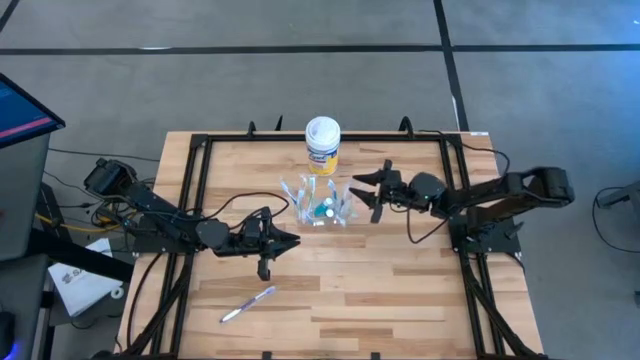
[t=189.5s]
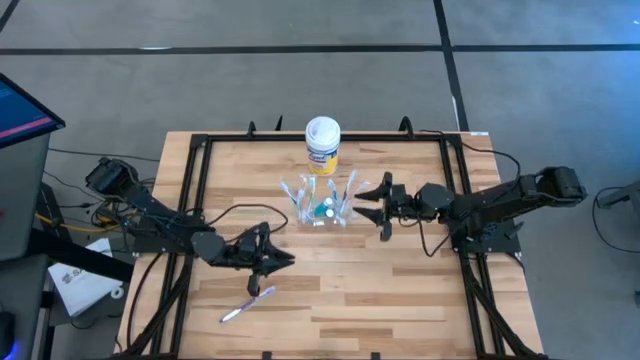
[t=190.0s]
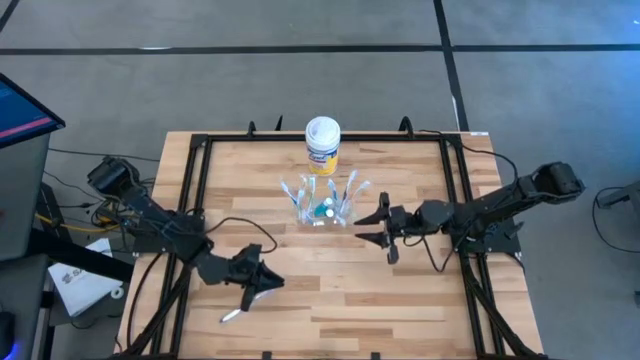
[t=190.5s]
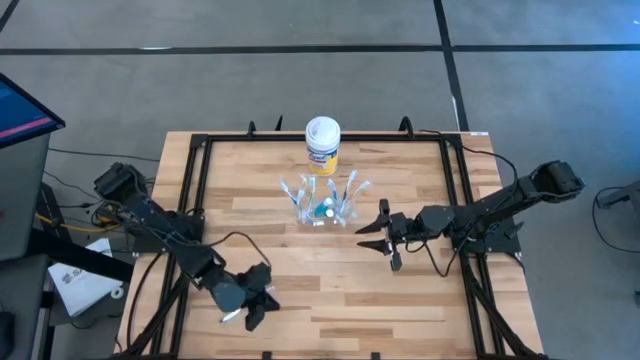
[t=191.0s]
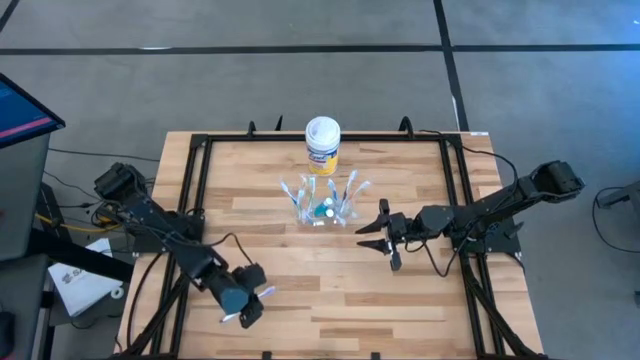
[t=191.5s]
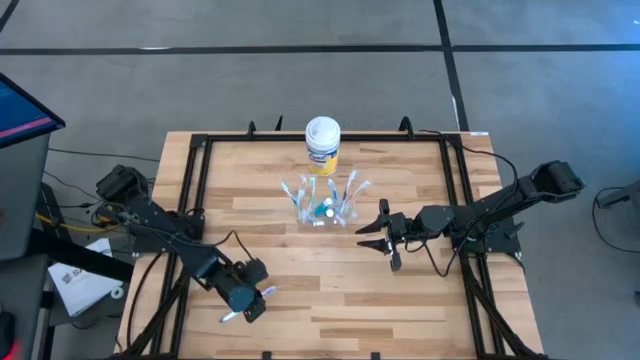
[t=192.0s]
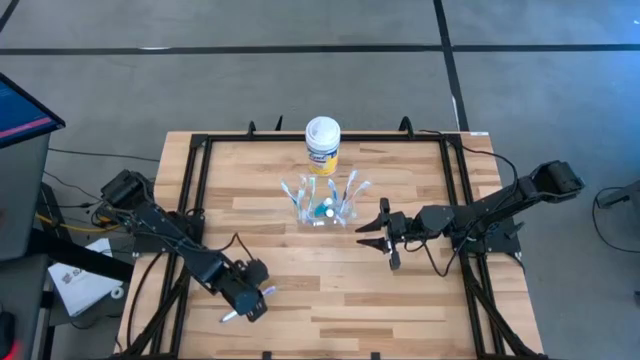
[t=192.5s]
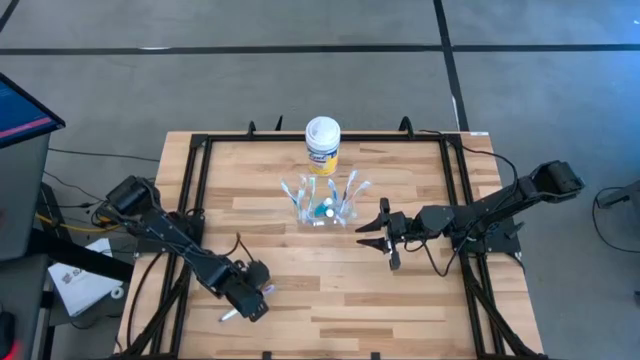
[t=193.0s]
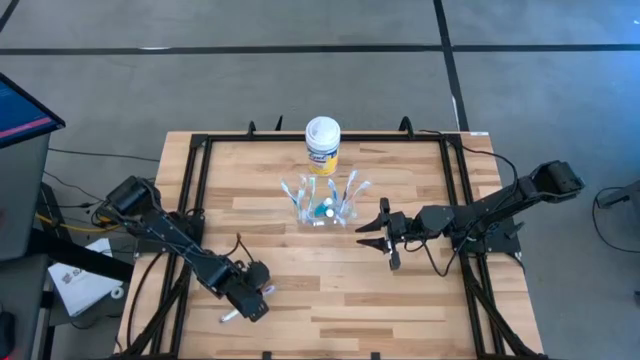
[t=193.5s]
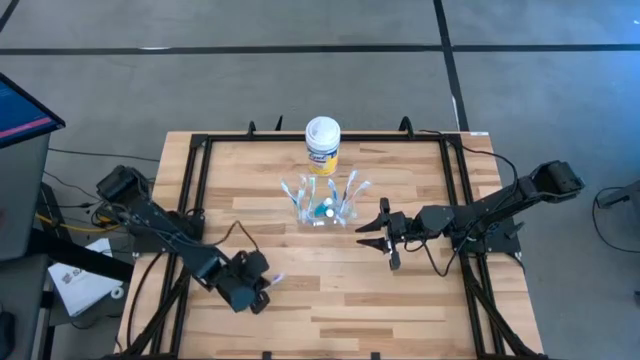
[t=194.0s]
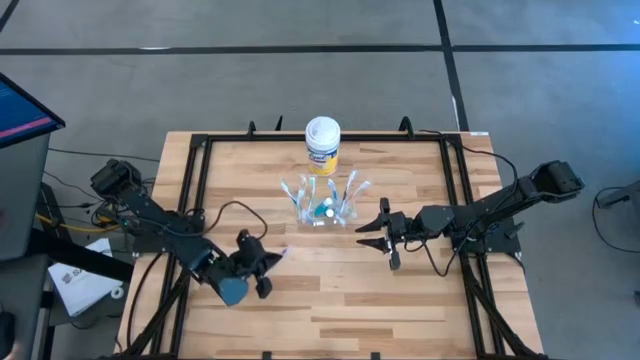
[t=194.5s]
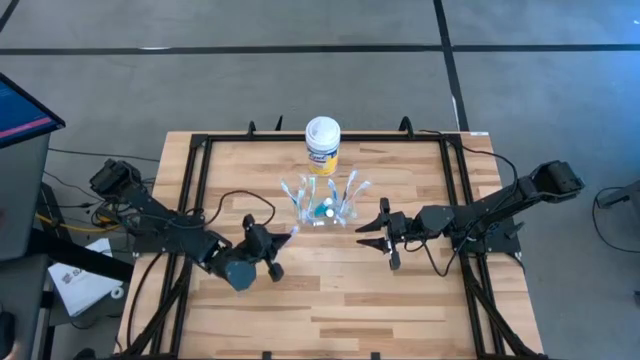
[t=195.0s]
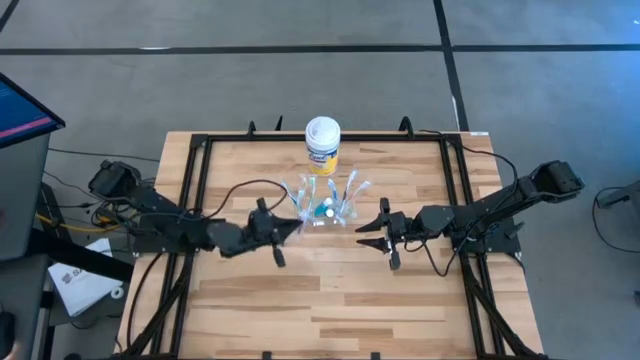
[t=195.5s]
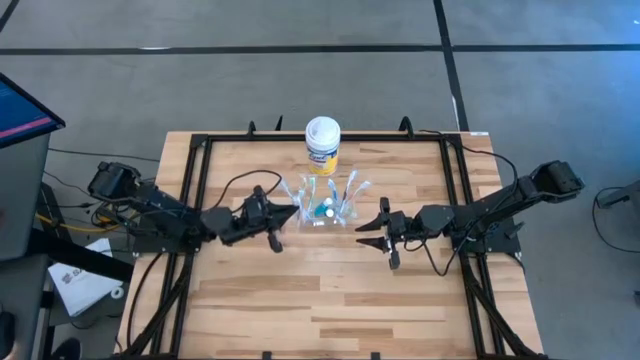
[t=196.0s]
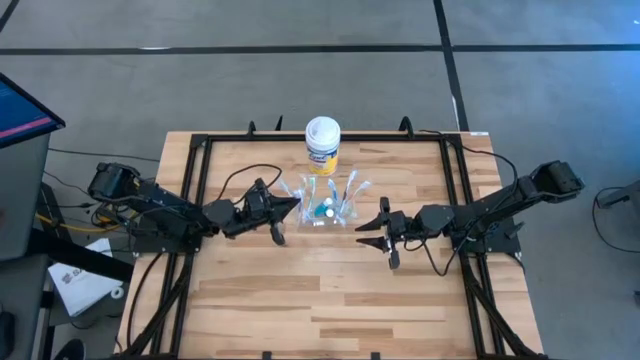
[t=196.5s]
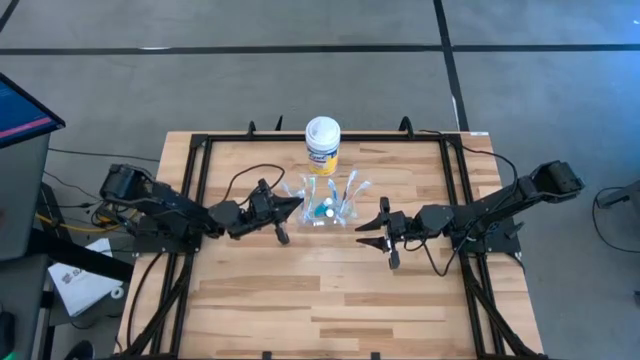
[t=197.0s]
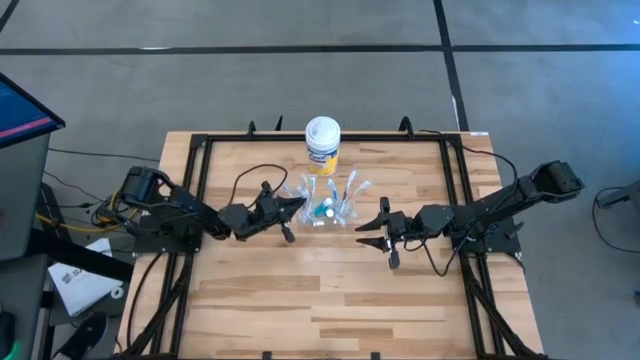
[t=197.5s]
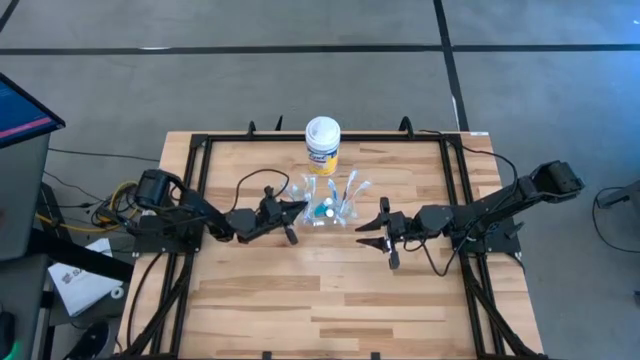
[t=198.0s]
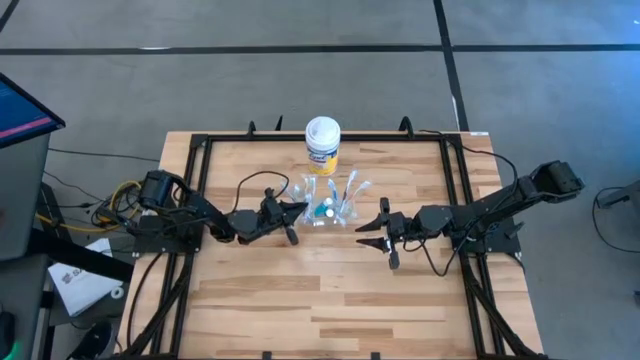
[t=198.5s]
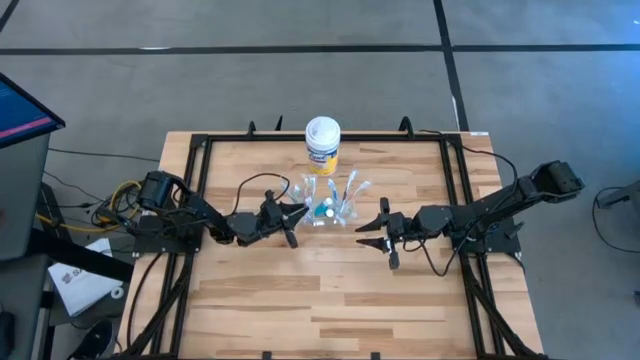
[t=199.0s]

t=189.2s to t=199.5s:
Task: Pick & Place toothbrushing station
Put the purple toothbrush into the transparent organizer

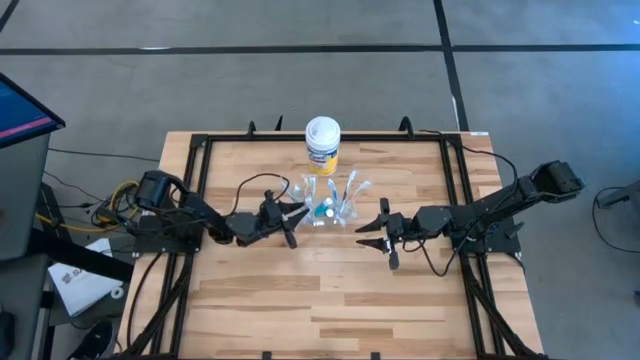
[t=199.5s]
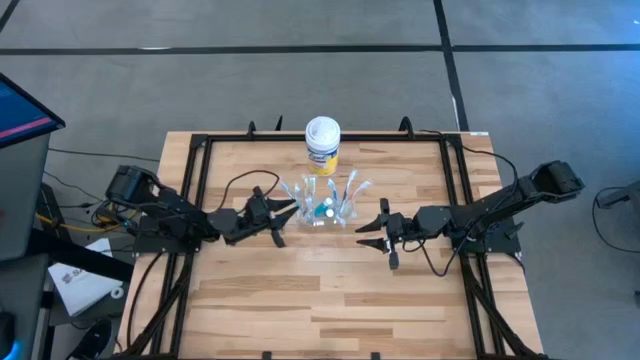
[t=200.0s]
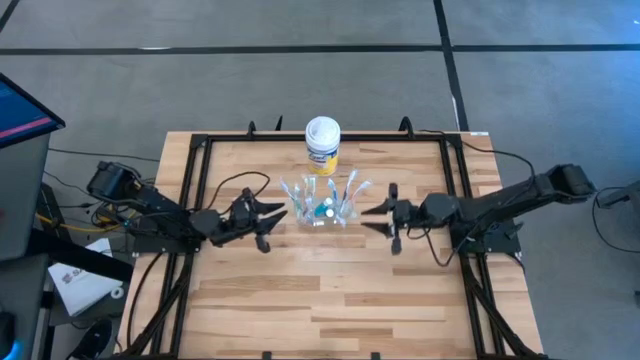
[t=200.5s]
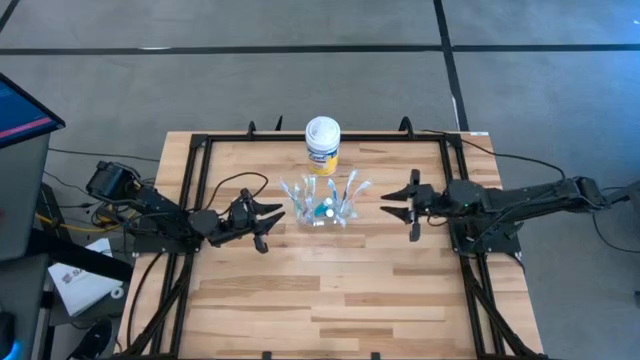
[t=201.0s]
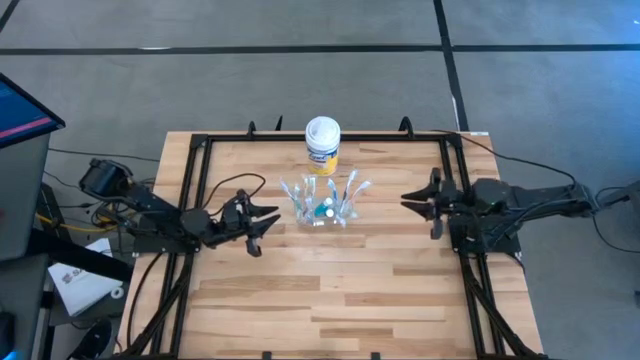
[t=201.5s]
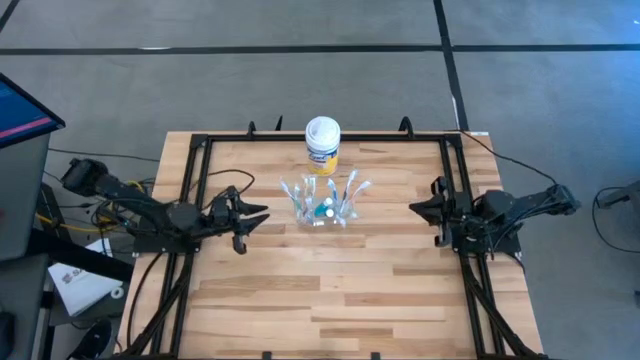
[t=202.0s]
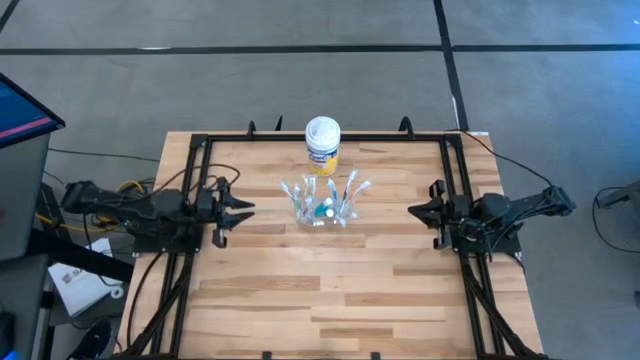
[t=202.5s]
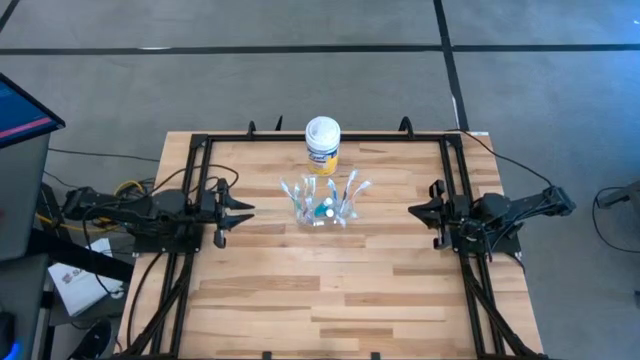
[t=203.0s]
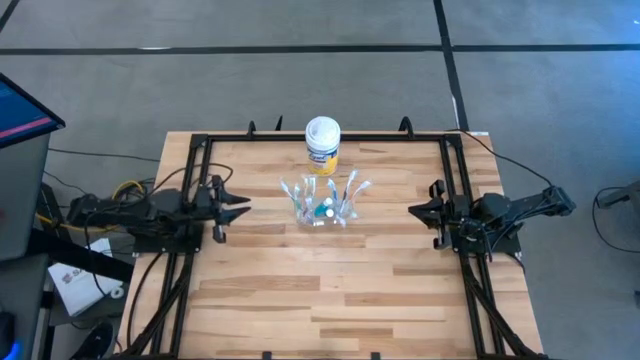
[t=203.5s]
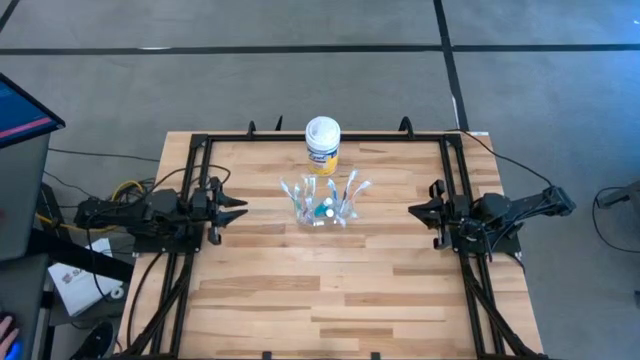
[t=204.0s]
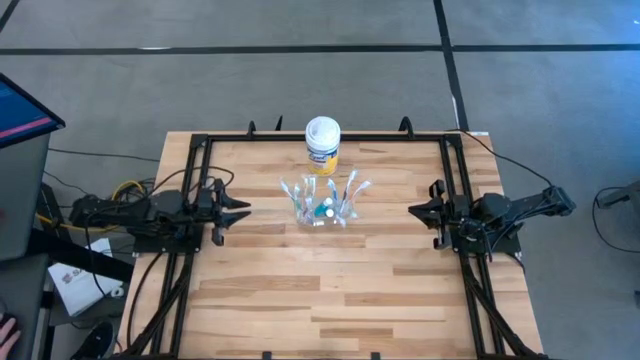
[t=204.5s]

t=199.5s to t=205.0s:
Return to Home Position

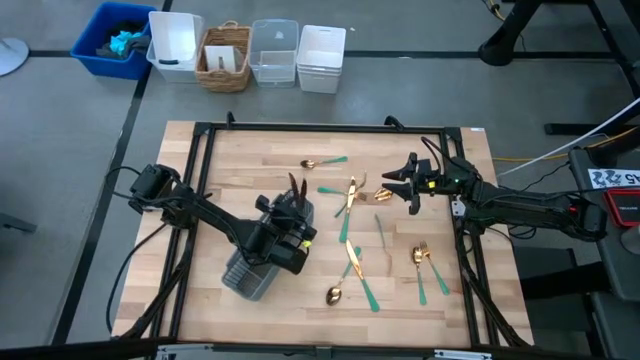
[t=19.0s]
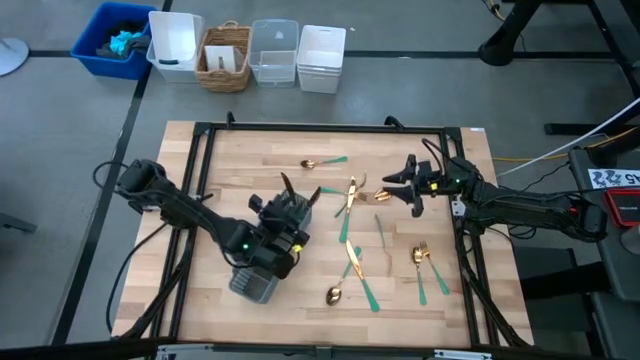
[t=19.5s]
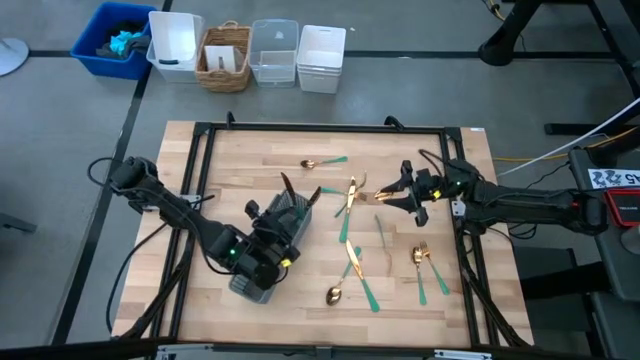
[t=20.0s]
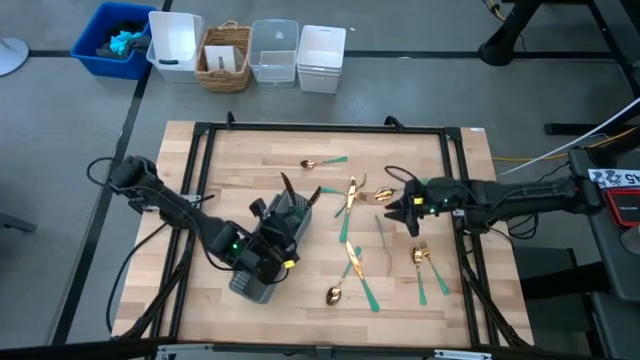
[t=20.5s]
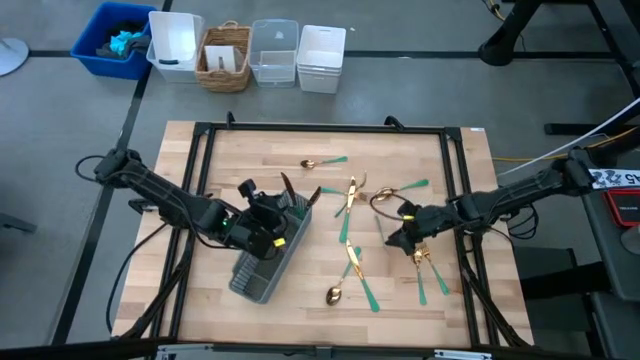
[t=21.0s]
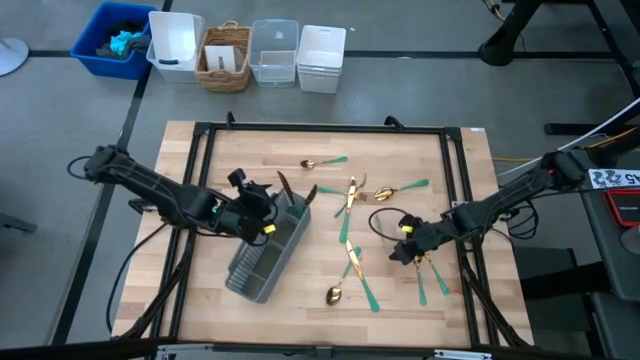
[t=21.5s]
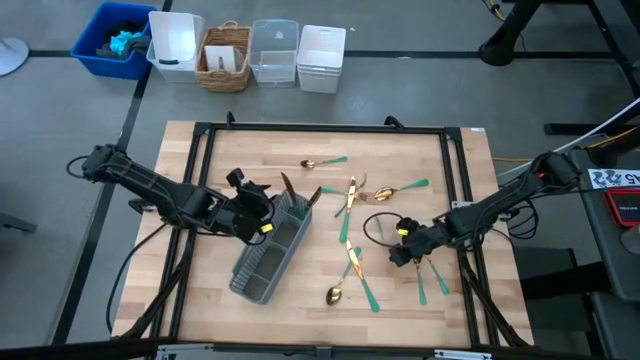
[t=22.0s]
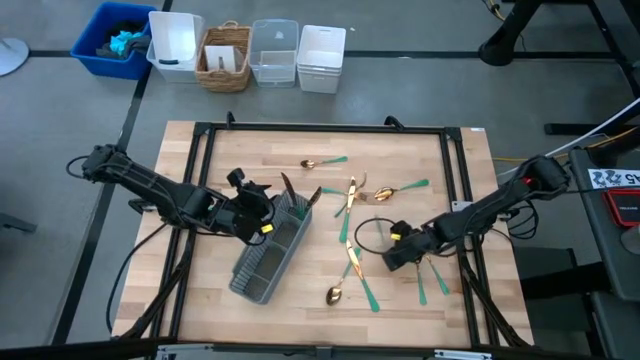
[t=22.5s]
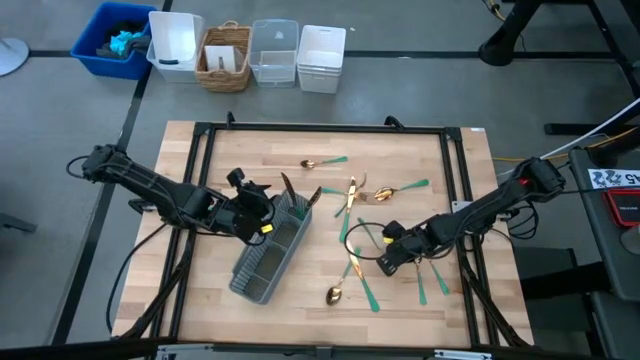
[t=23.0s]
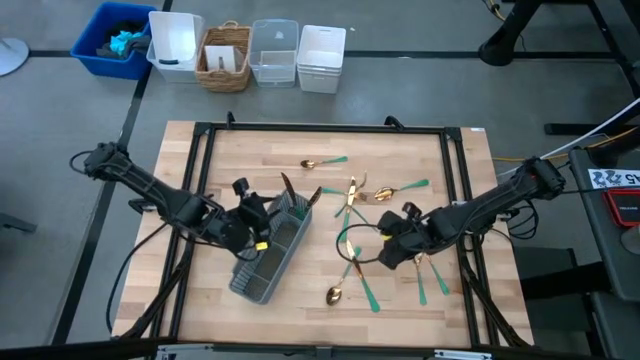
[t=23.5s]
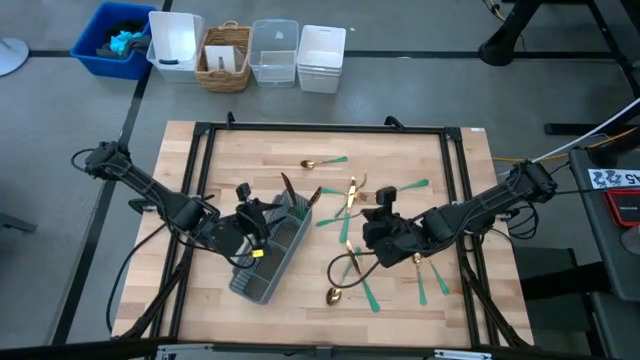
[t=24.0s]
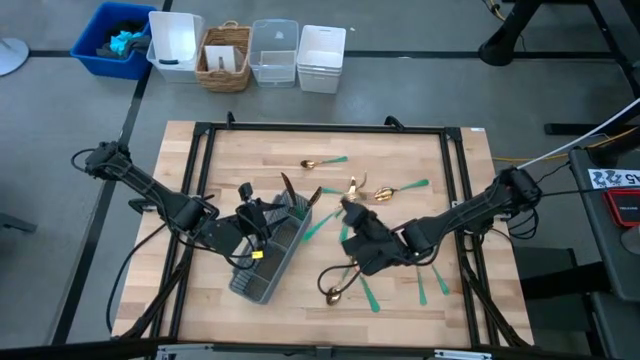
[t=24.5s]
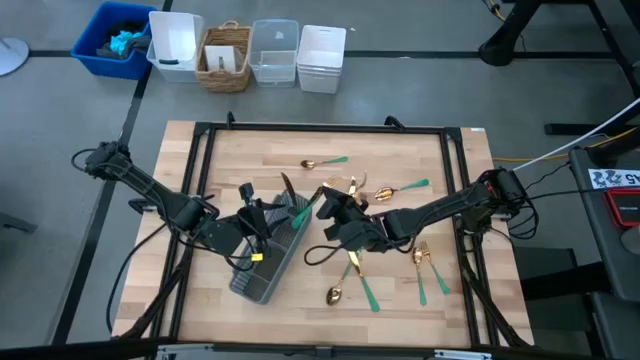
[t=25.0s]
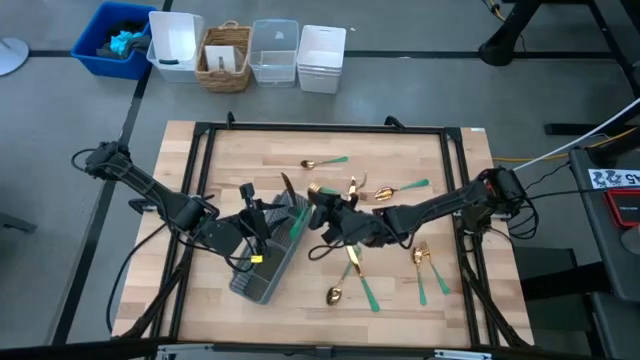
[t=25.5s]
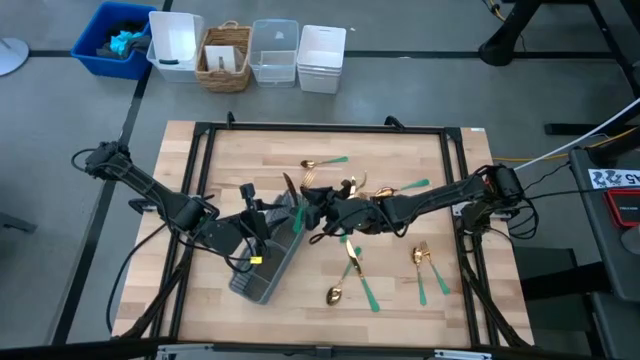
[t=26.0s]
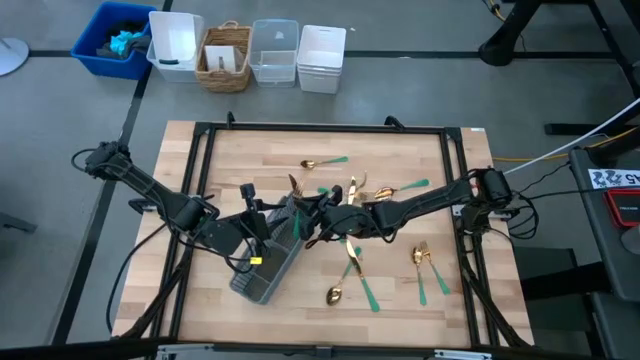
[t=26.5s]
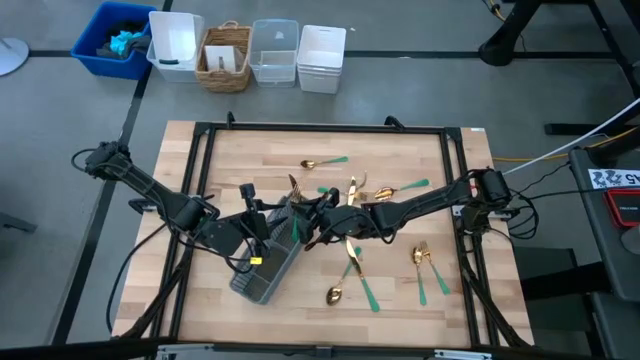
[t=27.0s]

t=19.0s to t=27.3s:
Task: Sort silverware
Put the green fork into the silverware basket
